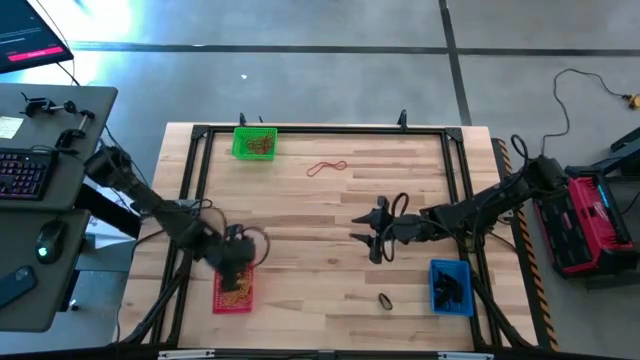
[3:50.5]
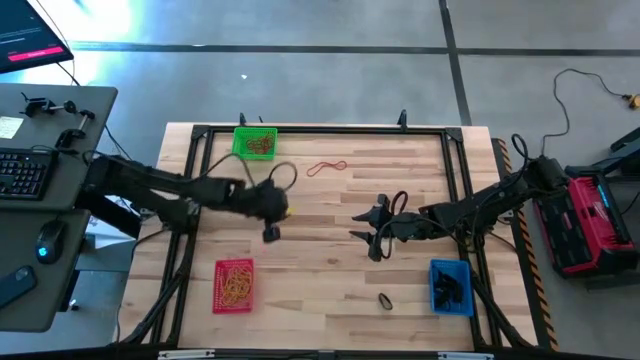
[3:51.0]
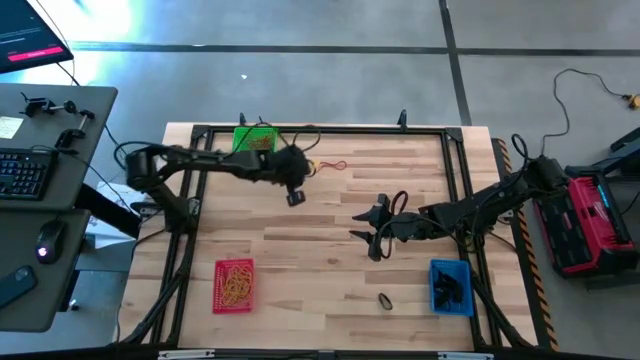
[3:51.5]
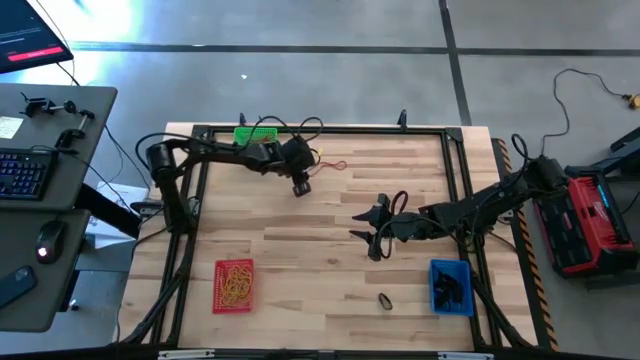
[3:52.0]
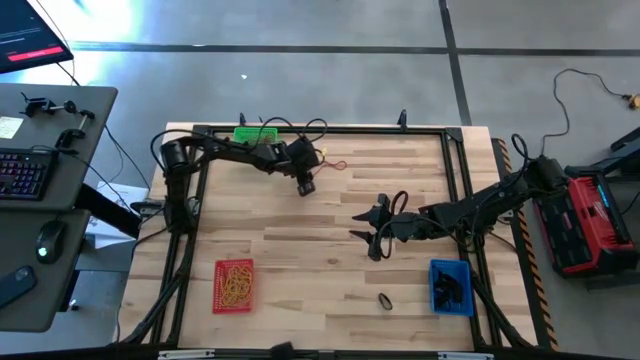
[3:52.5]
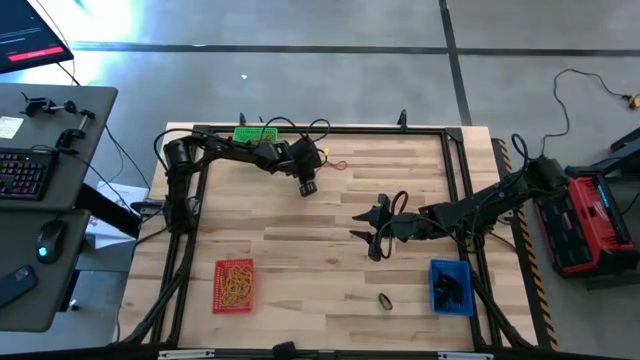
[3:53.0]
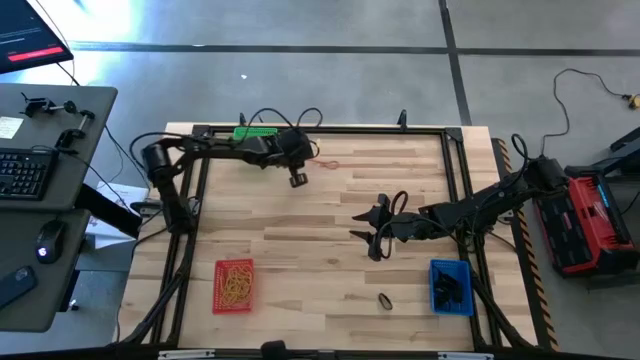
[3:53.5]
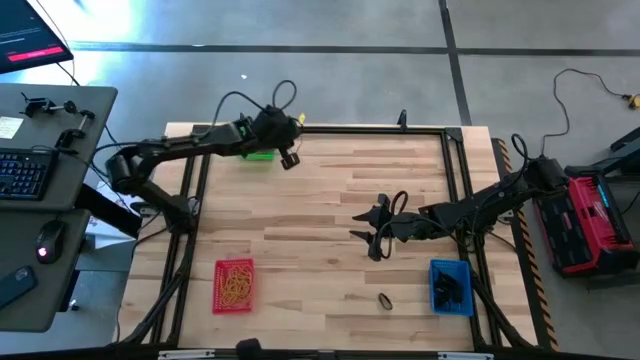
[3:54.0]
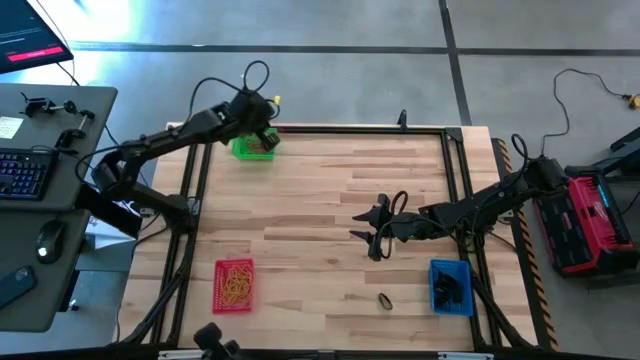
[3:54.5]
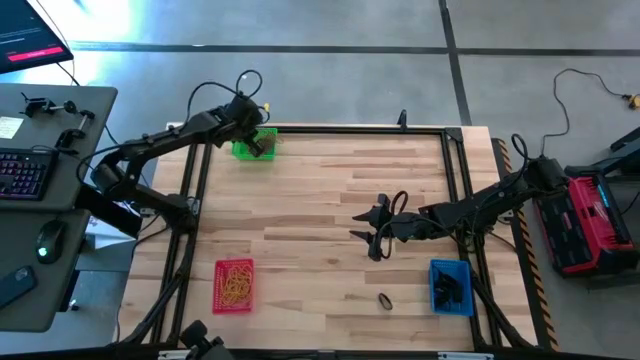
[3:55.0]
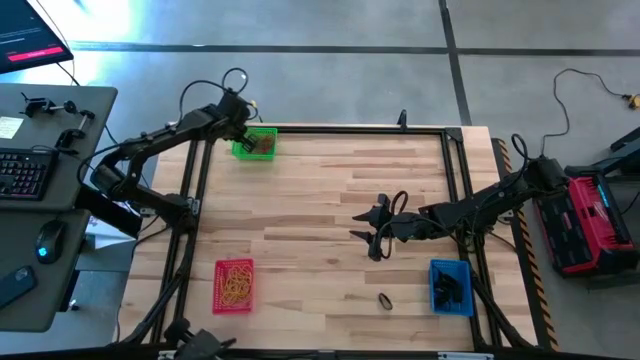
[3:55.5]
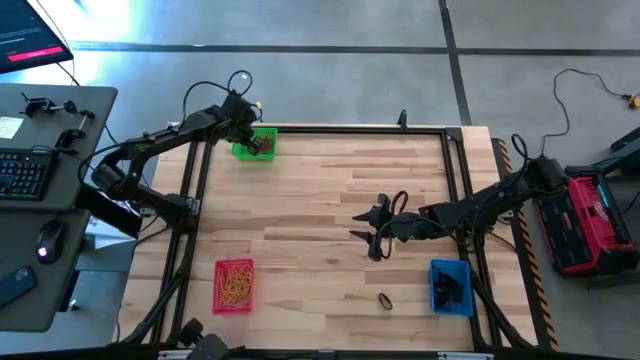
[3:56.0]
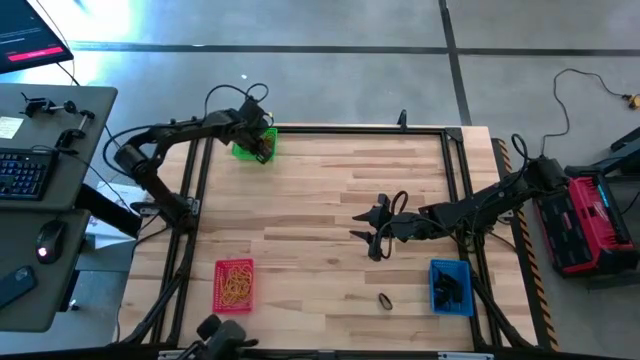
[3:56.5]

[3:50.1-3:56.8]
Task: Sort rubber bands into baskets
Put the red rubber band into the green bin

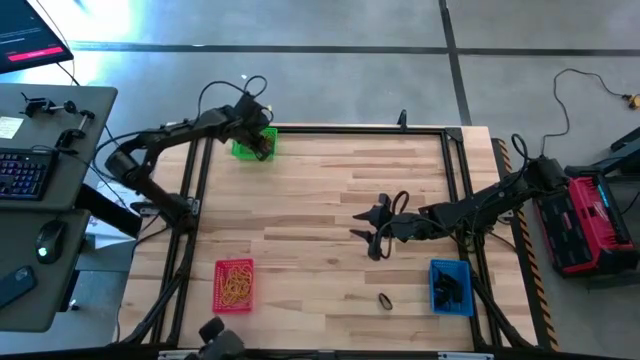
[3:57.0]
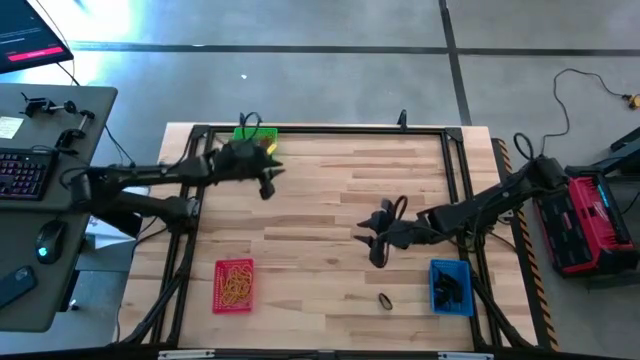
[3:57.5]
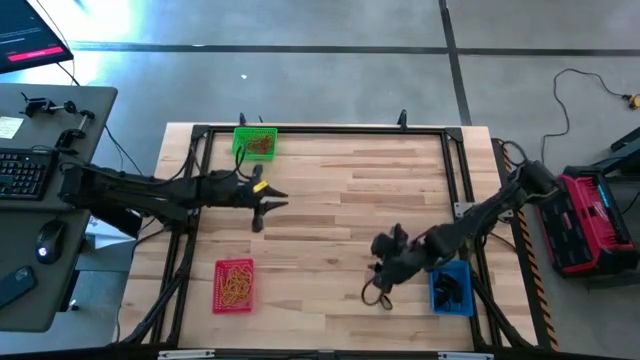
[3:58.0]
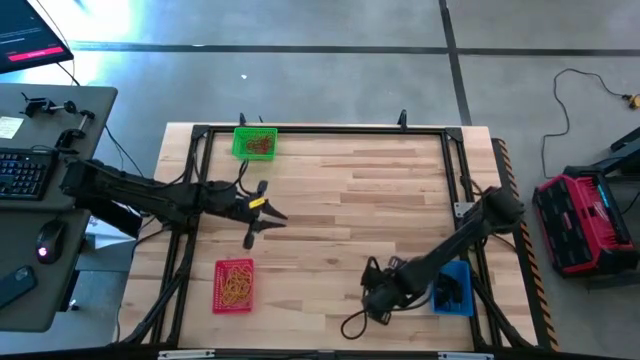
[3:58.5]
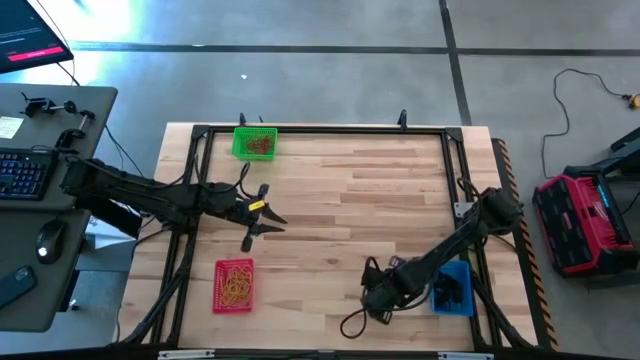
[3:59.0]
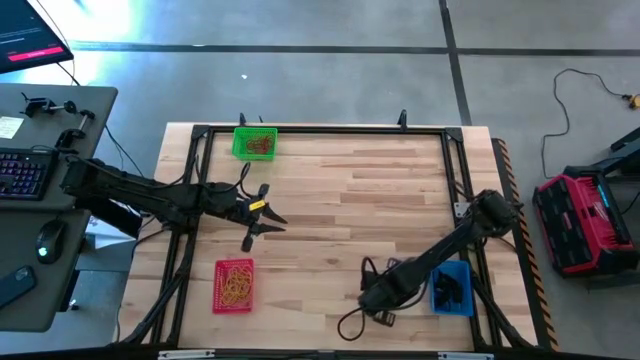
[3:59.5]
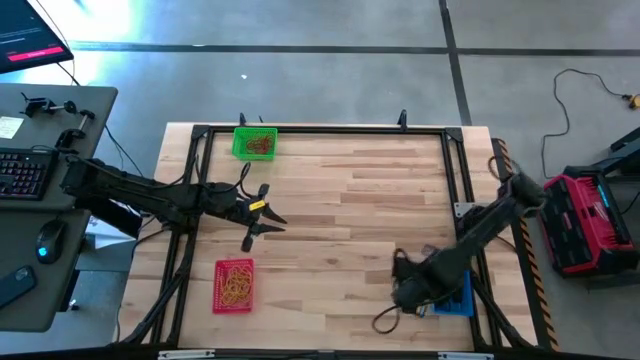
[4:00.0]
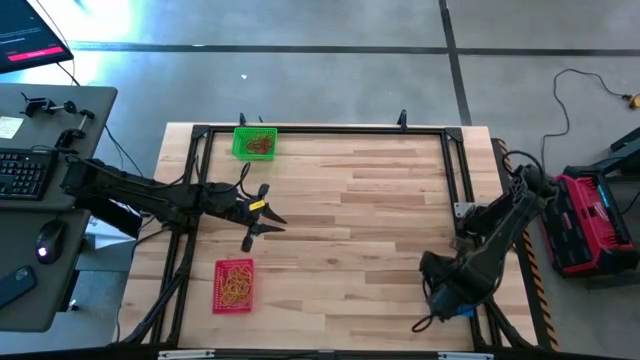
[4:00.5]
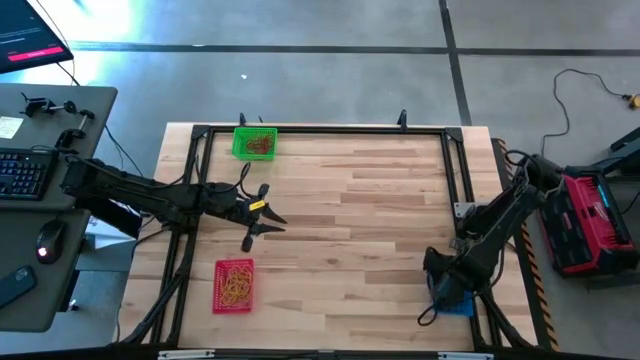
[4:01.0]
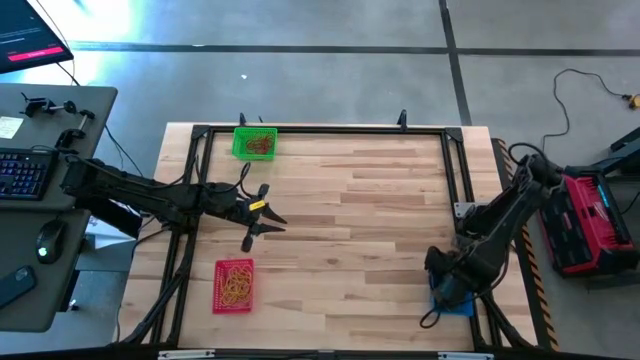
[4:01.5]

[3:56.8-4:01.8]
Put the black rubber band into the blue bin

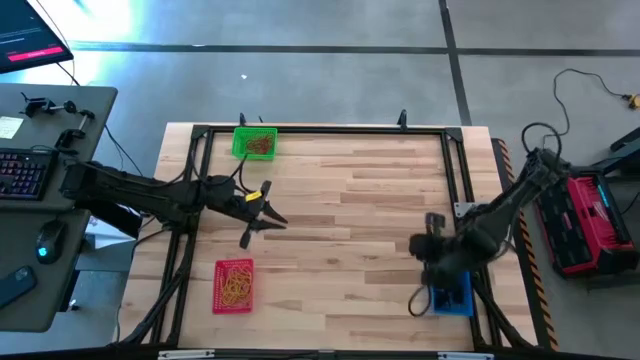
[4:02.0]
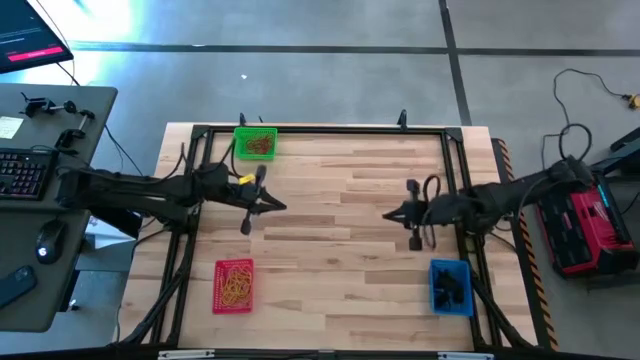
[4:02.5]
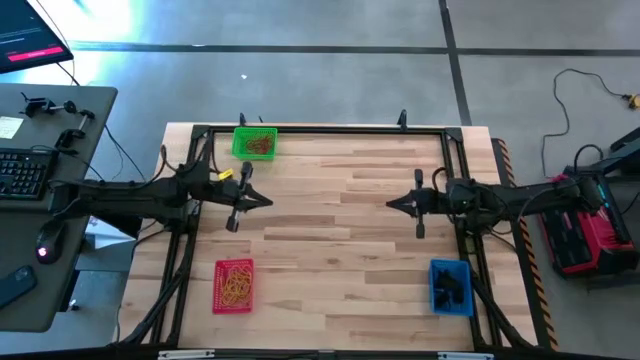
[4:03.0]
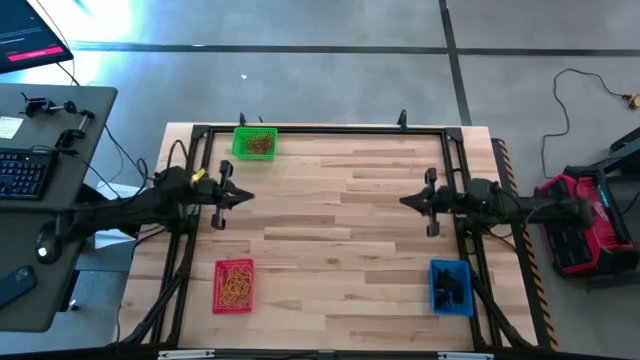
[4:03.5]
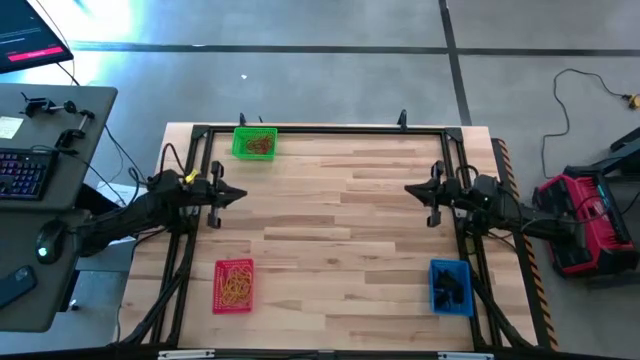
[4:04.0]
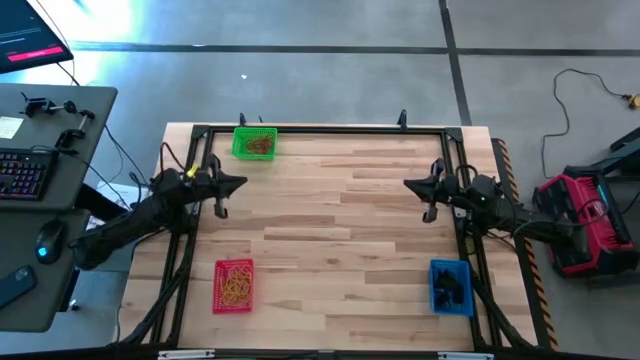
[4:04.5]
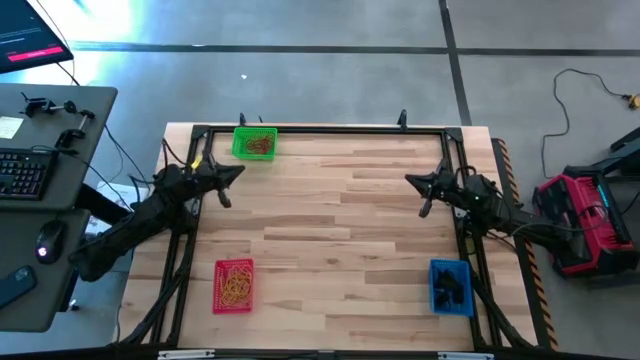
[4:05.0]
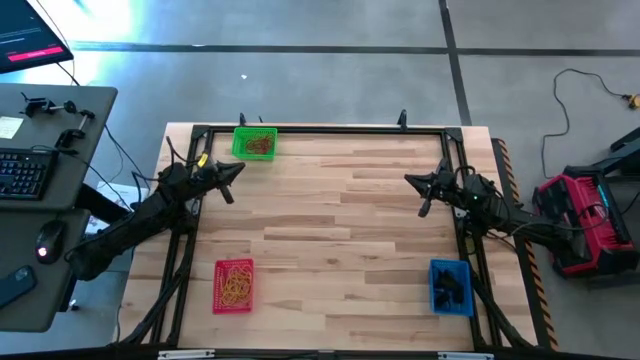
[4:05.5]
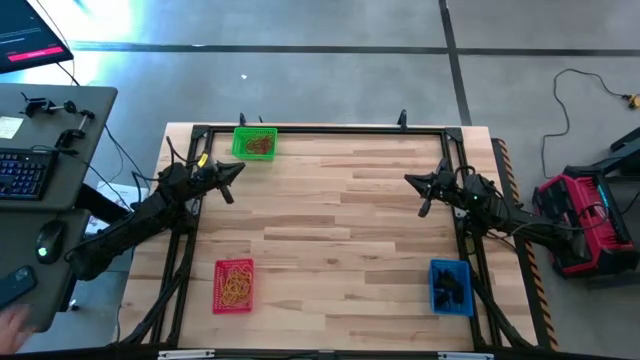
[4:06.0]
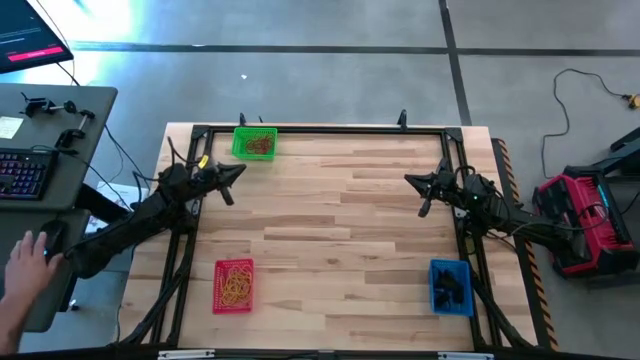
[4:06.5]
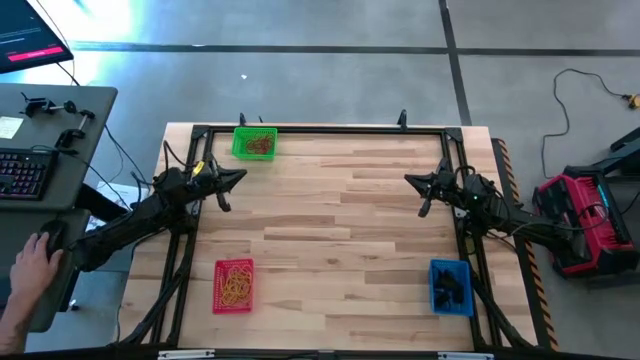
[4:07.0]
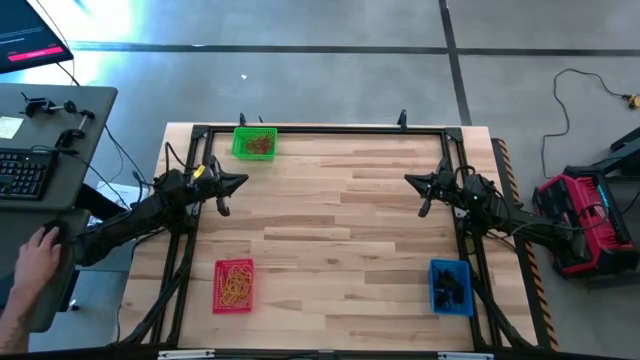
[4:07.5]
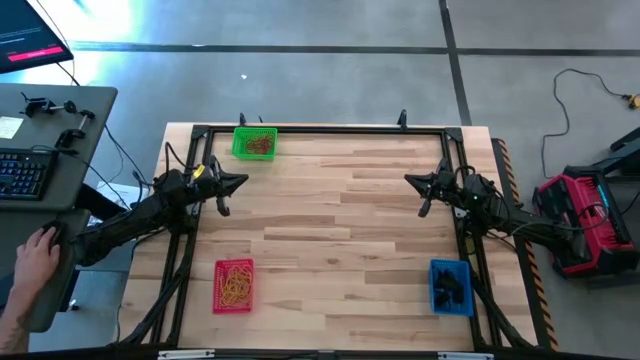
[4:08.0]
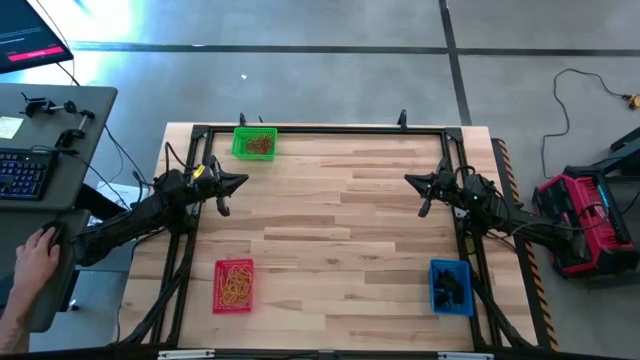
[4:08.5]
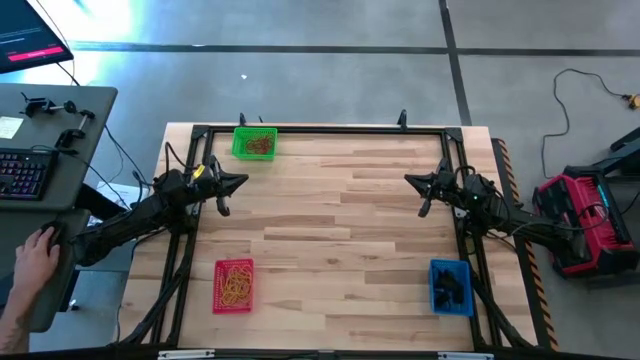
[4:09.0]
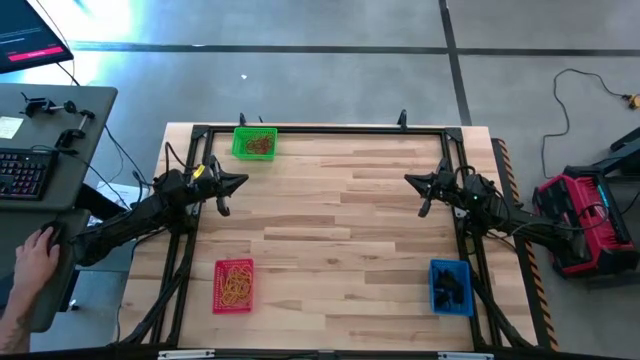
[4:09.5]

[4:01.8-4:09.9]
Return to Home Position

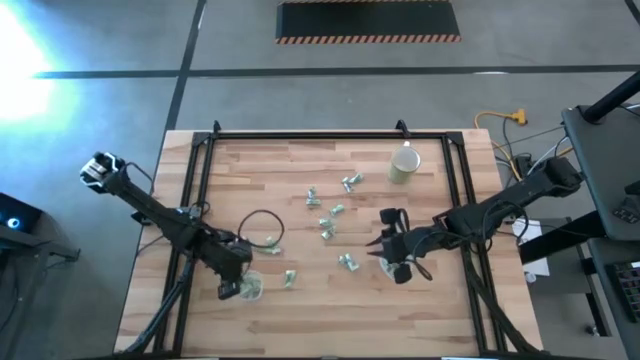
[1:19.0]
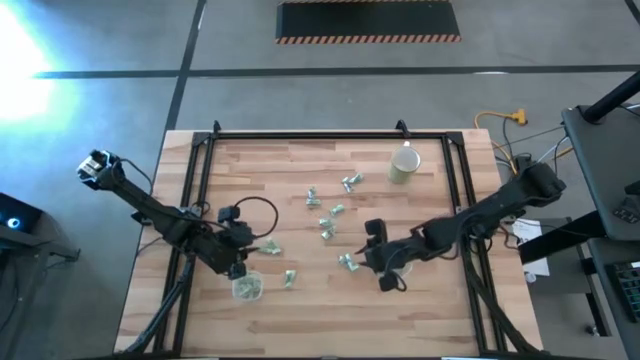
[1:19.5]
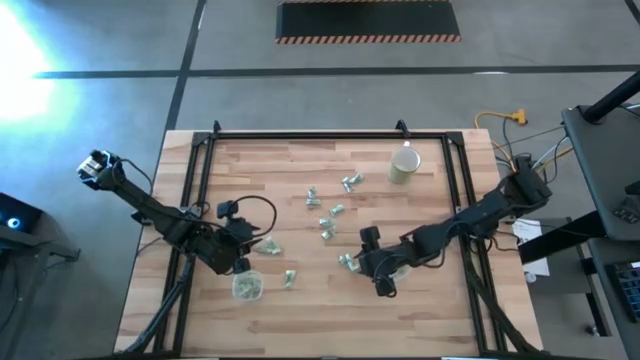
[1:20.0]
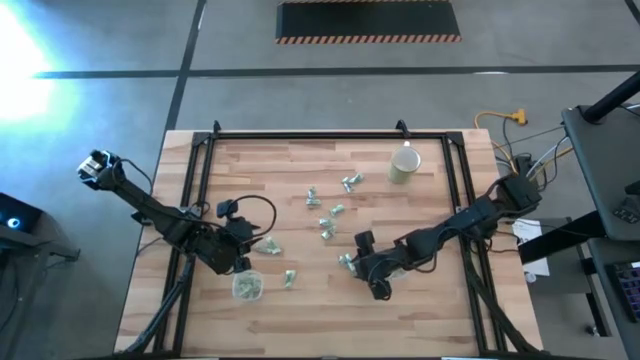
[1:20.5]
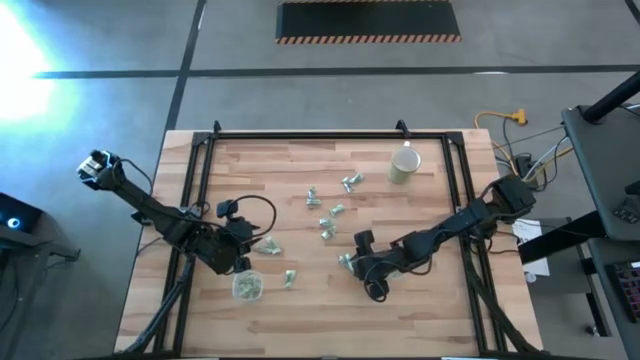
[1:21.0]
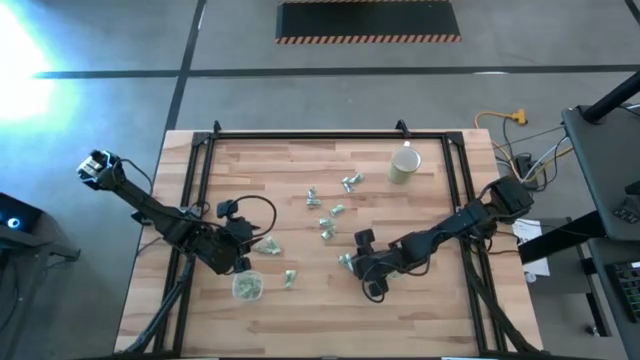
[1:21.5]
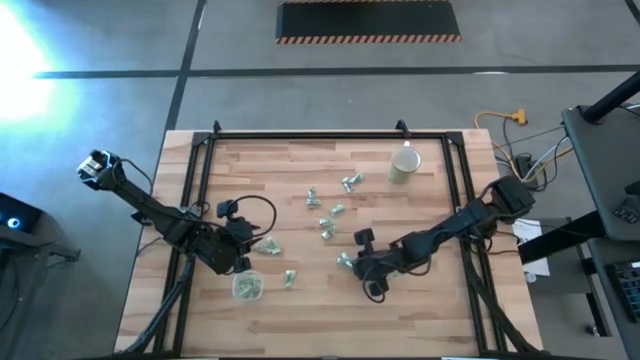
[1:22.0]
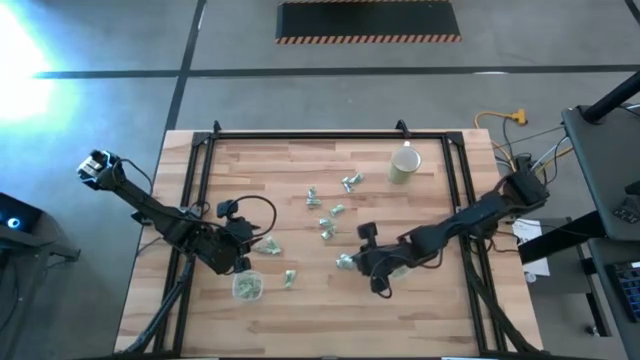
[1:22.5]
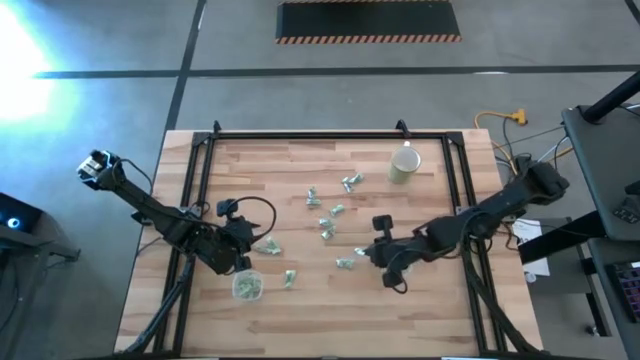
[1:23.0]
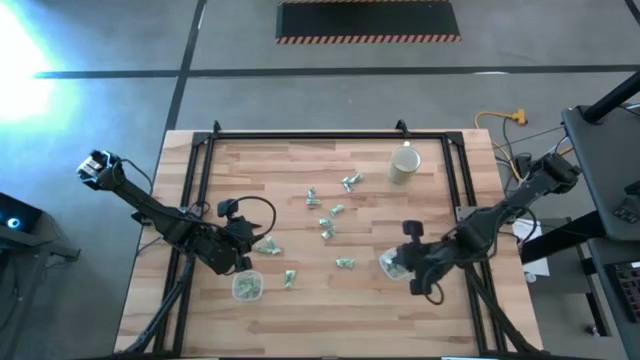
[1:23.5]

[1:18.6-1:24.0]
Task: Pick and place Stevia / Truvia into bins
Put the stevia packet into the right transparent container
